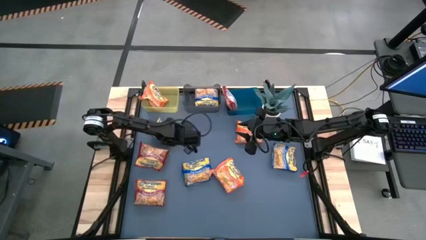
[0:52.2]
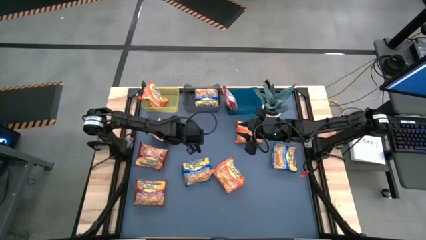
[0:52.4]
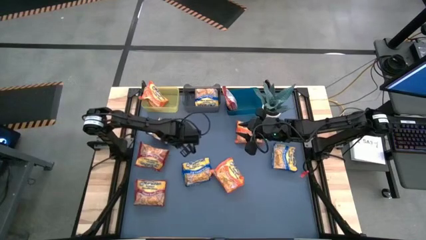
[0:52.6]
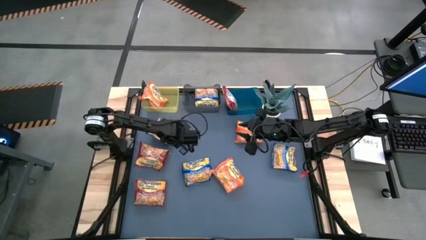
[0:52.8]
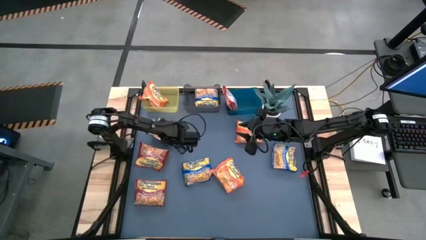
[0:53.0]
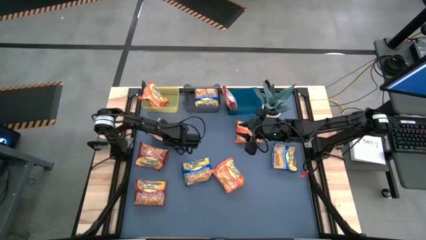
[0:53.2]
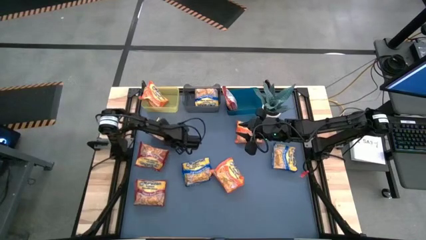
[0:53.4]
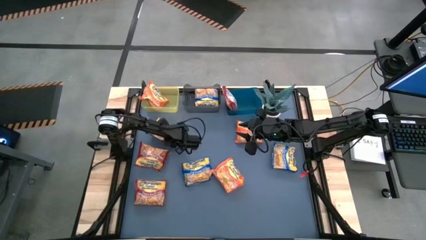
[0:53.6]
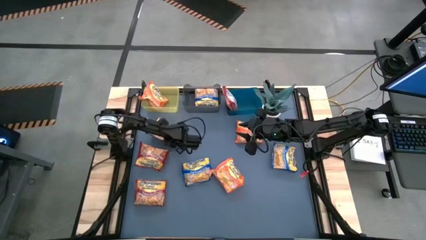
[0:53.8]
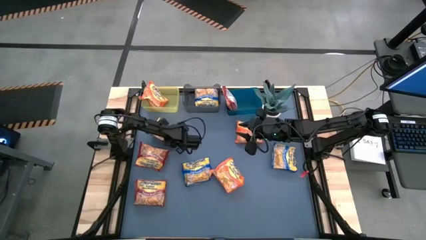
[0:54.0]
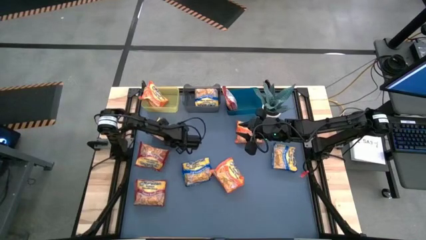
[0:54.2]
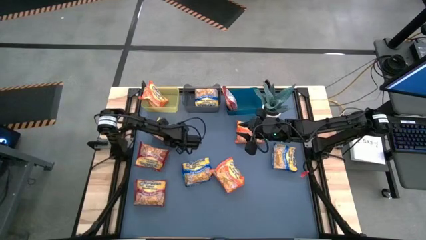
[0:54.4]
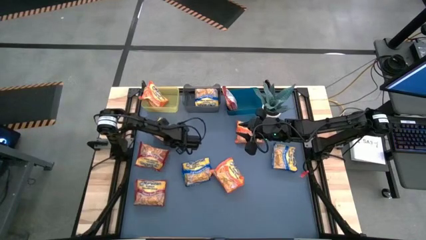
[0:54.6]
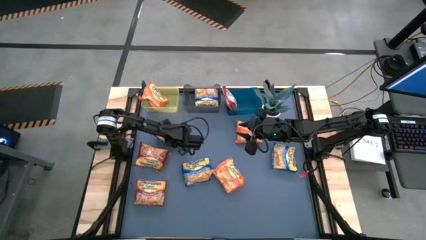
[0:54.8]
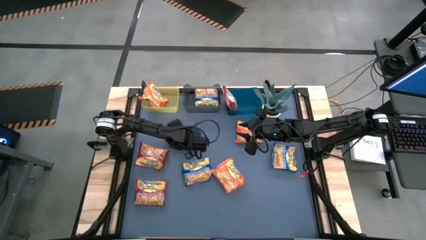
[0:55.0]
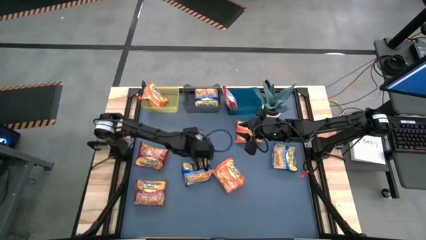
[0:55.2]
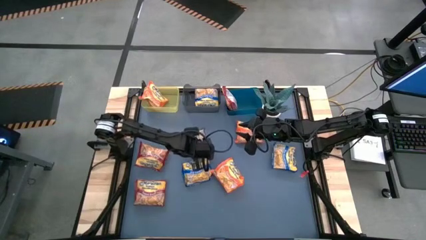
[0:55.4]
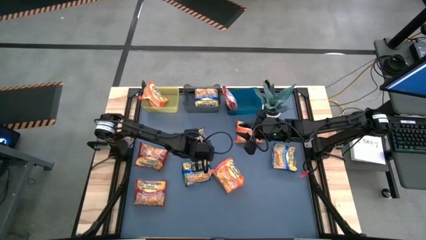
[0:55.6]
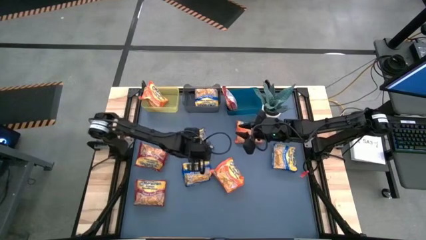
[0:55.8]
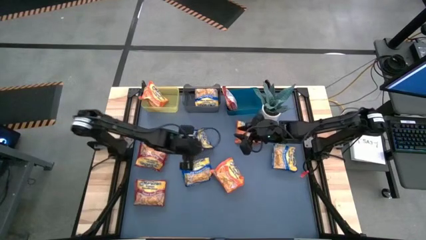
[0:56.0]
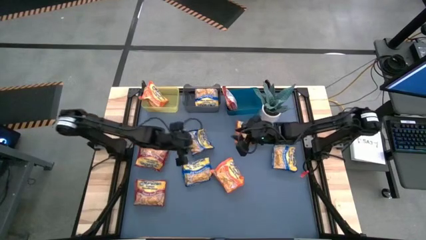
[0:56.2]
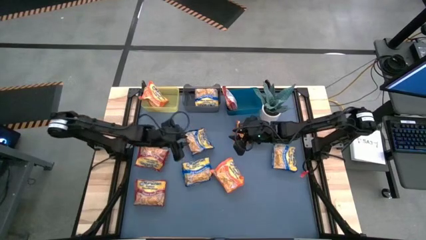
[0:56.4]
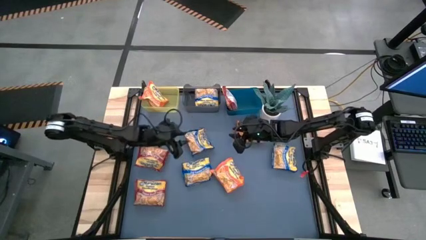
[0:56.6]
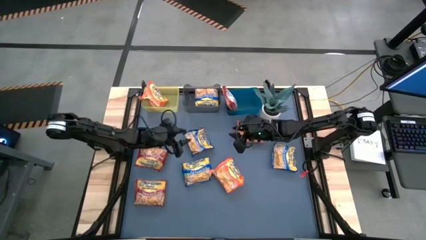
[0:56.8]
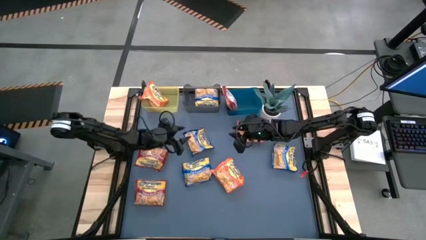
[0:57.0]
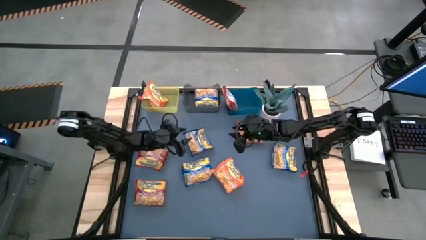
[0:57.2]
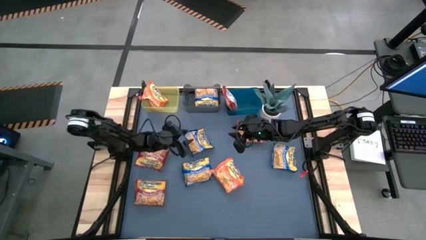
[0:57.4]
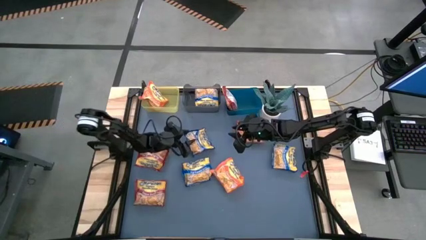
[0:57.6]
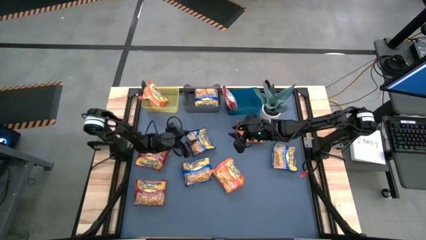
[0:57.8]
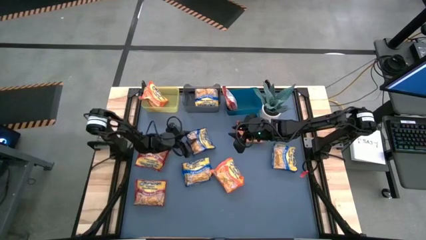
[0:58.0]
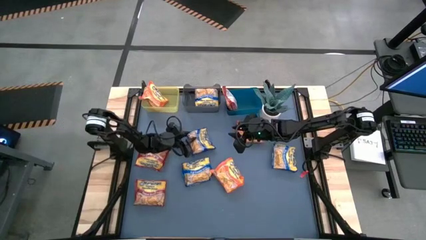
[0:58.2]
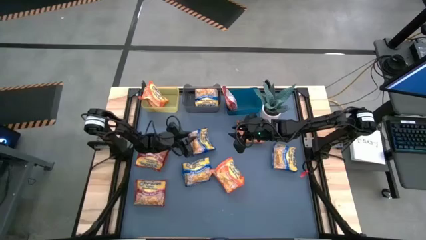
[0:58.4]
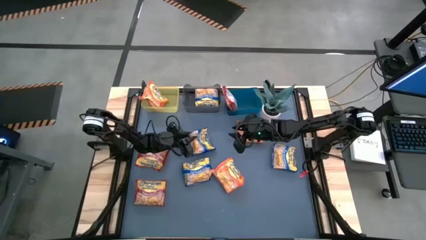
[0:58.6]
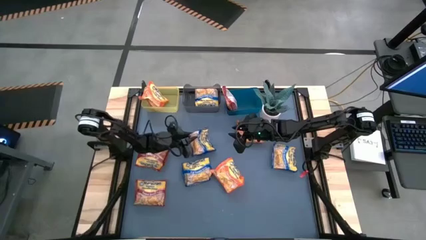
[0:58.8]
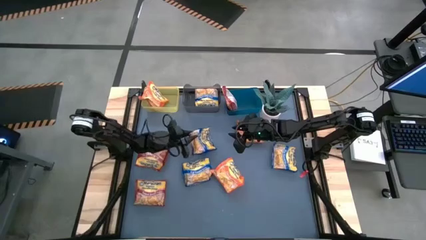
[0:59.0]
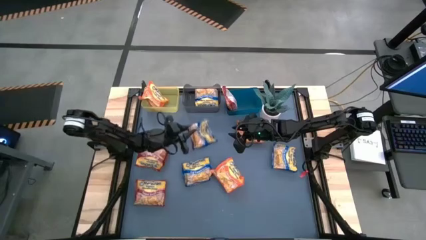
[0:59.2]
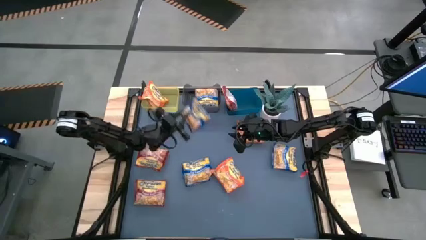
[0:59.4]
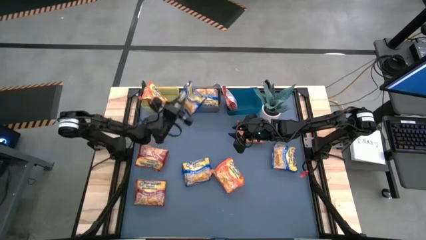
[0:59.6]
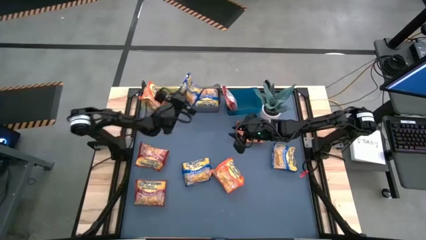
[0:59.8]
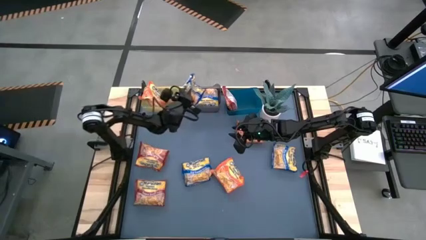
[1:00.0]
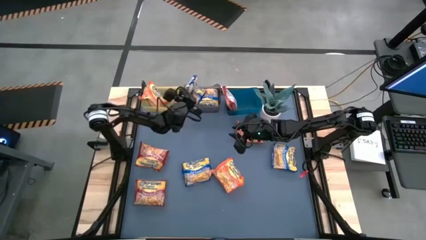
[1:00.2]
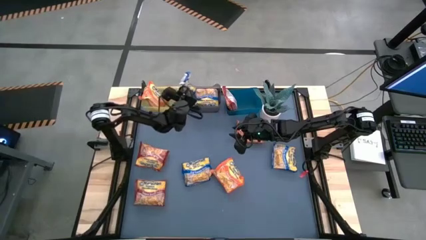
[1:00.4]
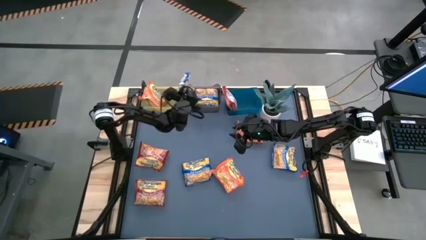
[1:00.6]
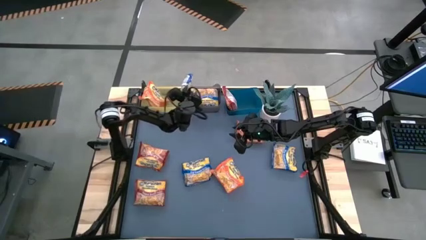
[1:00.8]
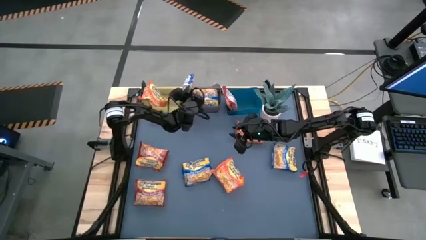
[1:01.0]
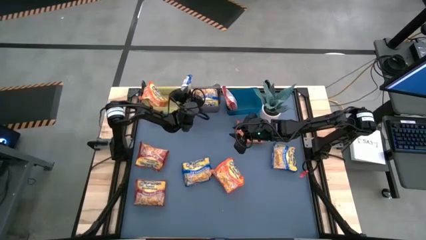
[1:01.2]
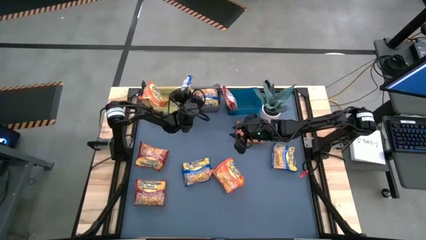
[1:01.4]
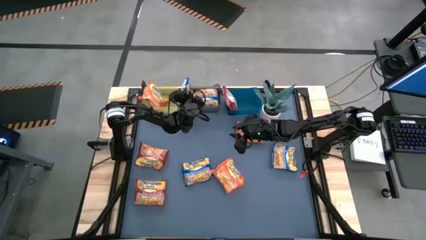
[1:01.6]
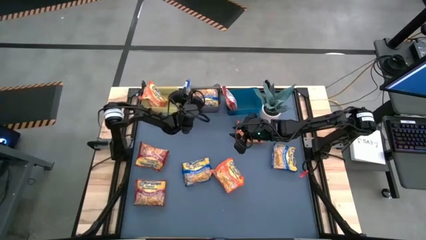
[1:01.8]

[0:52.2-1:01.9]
Task: Sort Maruchan noodles
Put the blue noodle pack into the black bin
